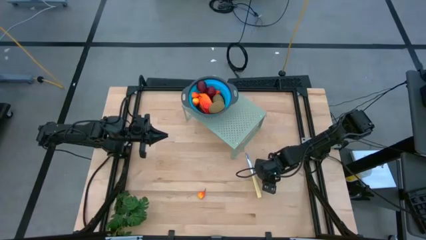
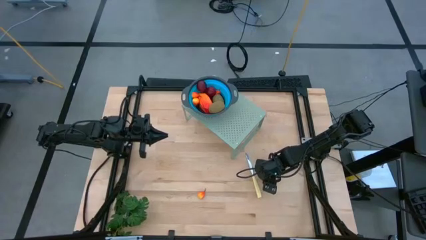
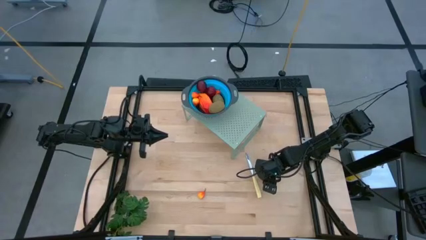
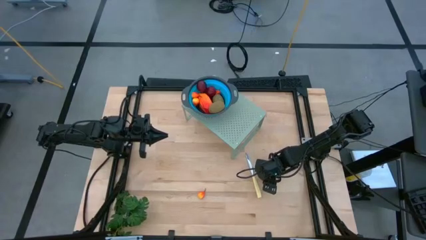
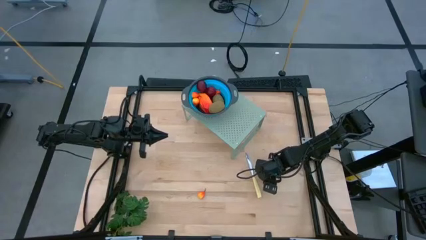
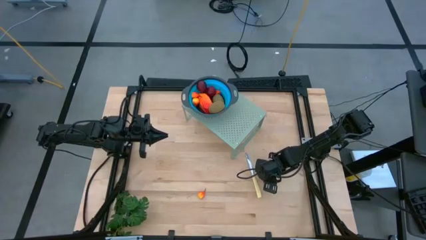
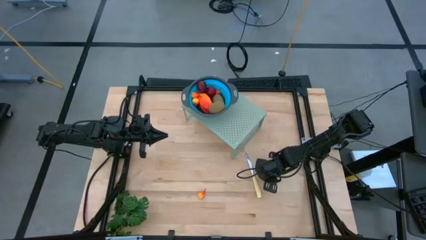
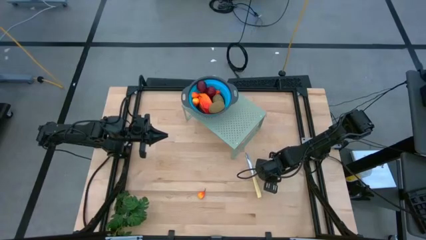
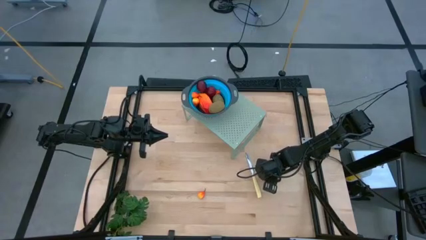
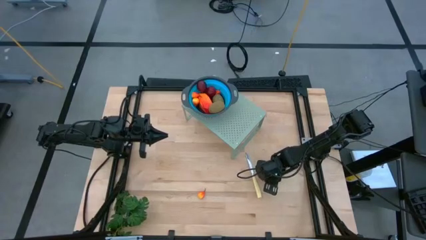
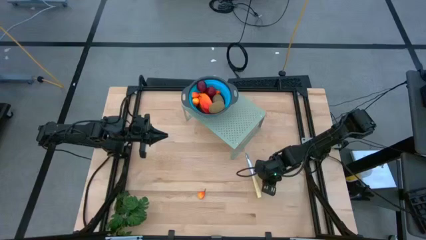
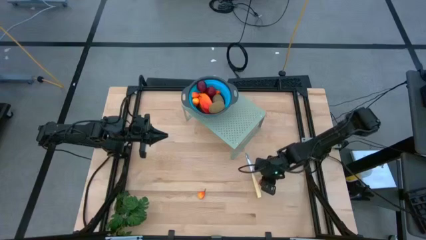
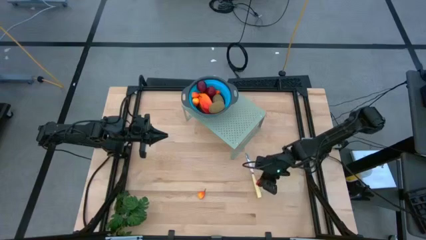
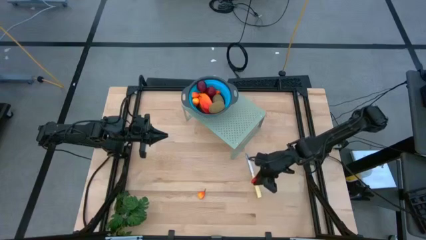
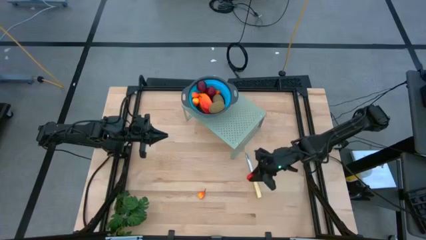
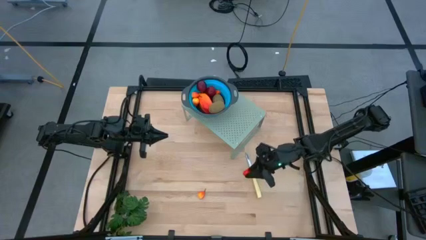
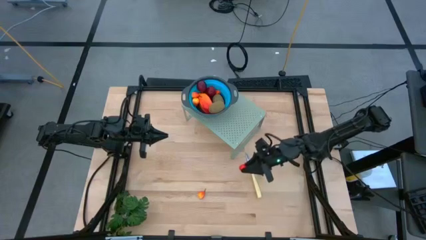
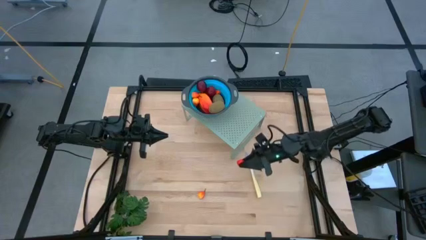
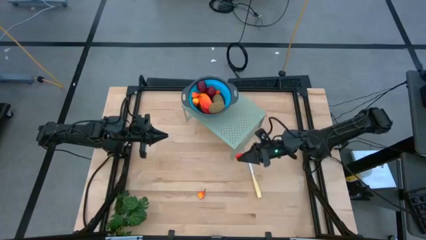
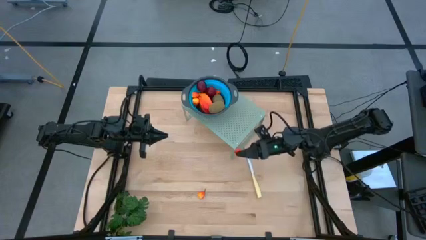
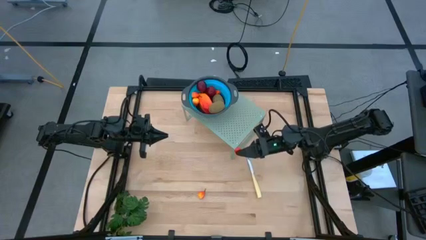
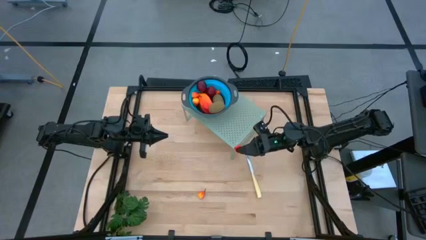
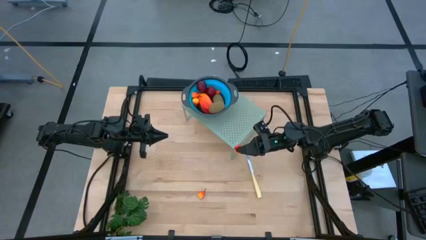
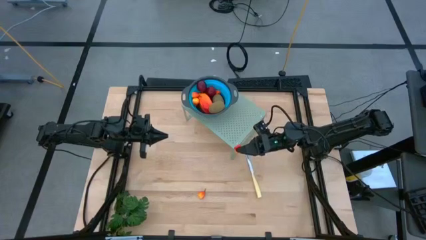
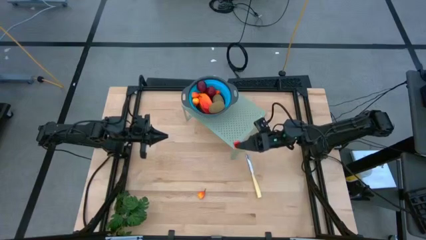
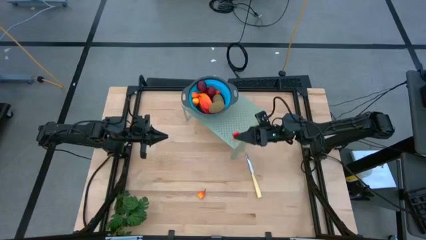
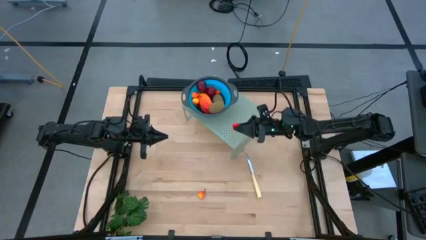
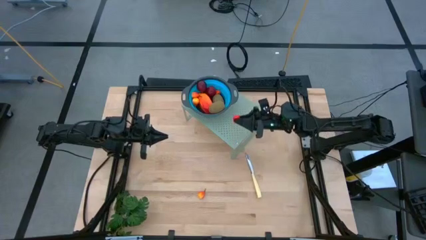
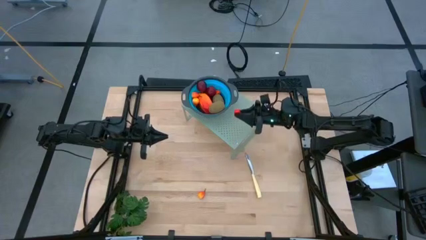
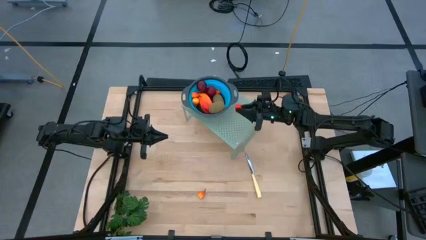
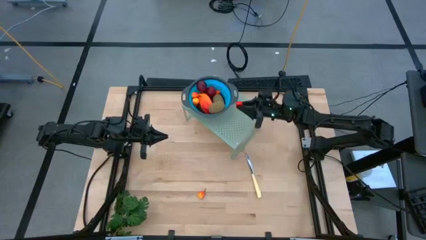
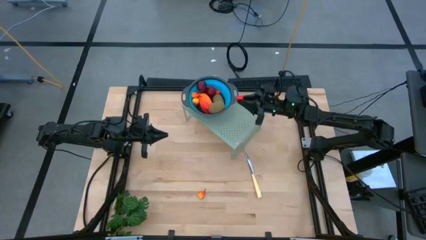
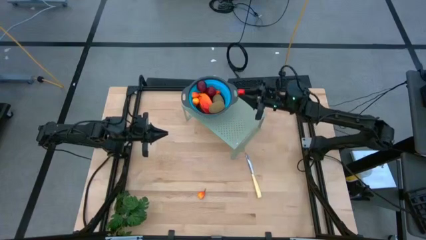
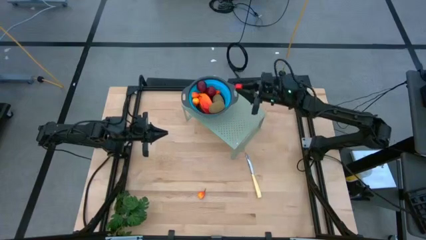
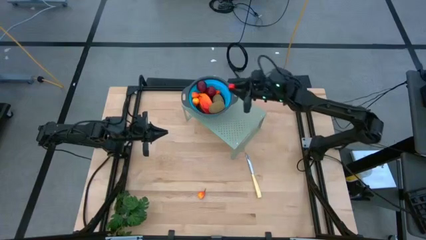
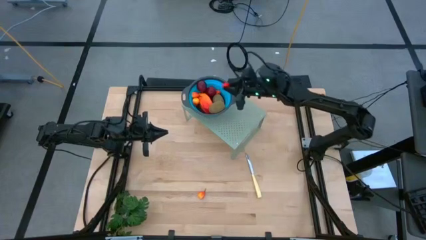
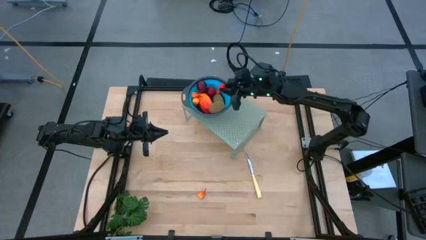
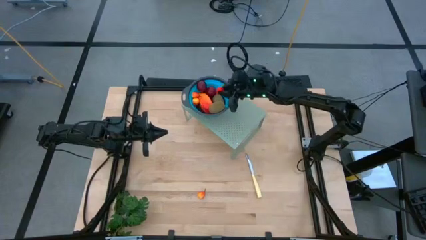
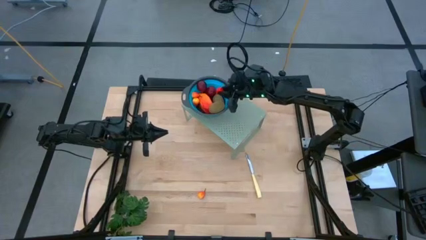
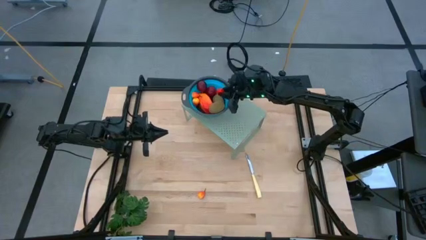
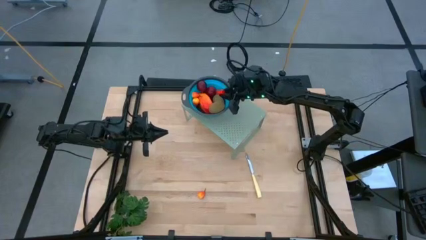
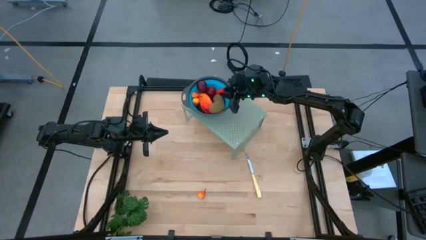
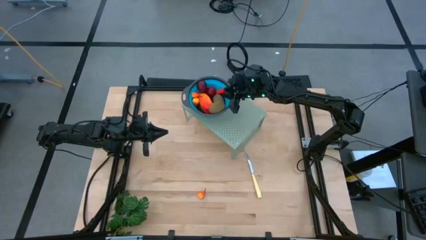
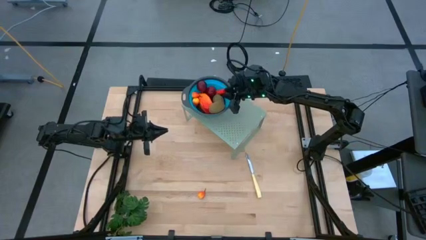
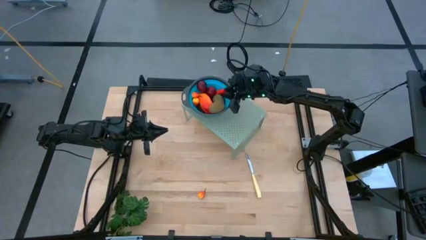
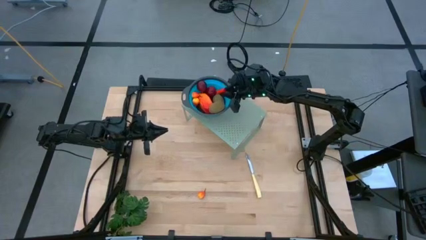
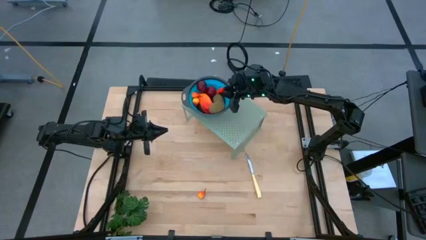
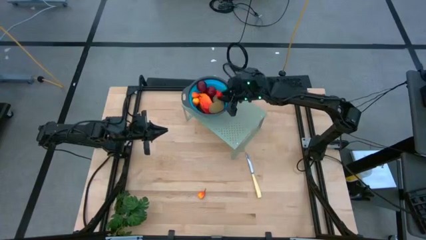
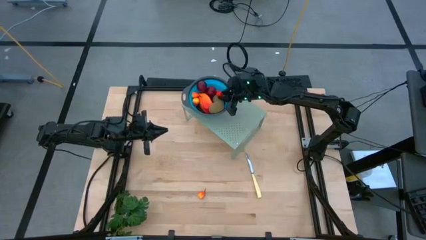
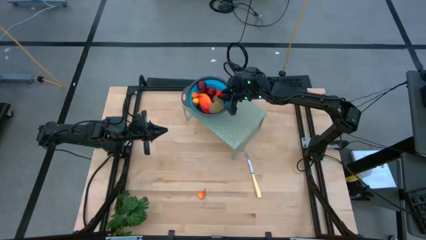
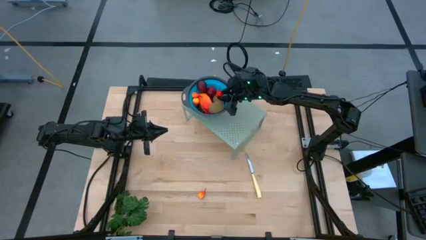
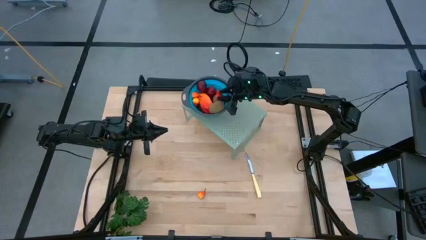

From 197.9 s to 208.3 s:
Task: Pick & Place Fruit
Put the pear into the blue strainer bowl on the shelf

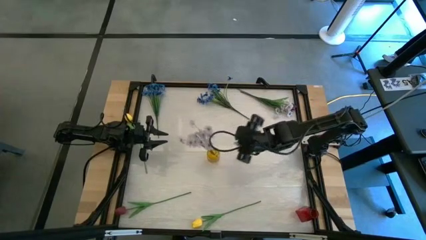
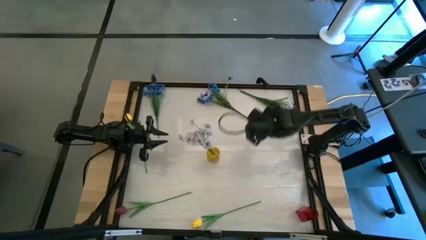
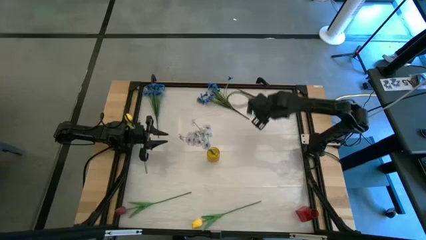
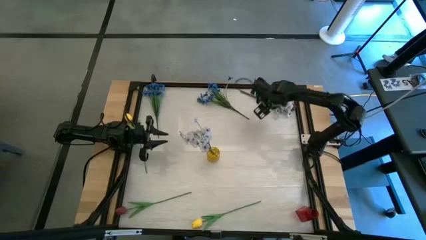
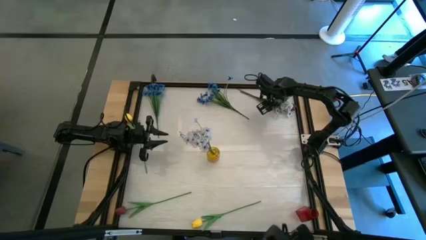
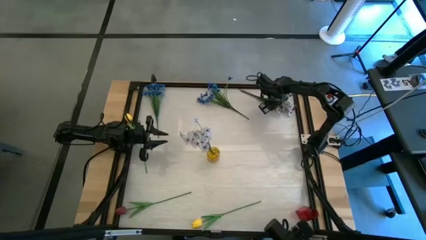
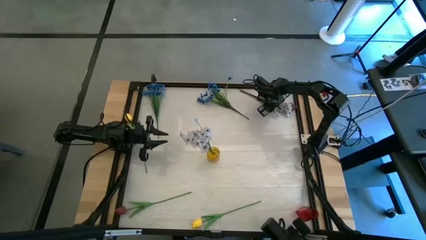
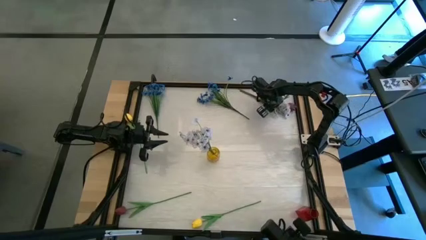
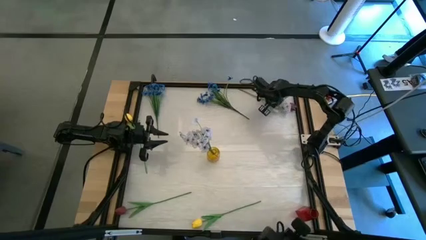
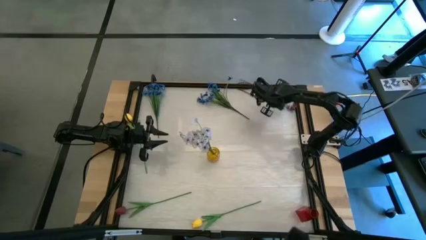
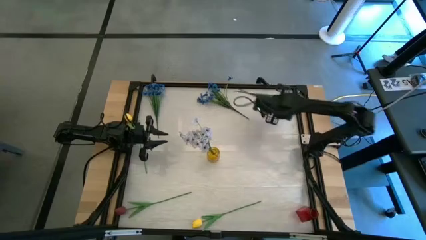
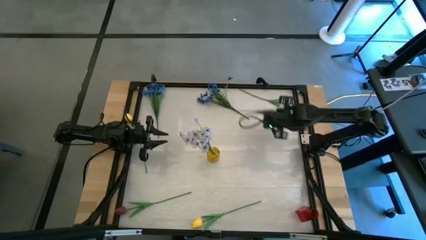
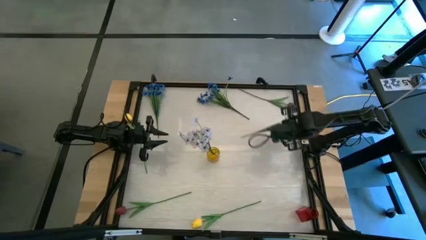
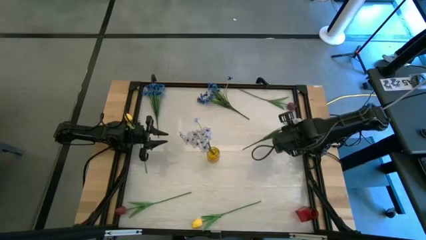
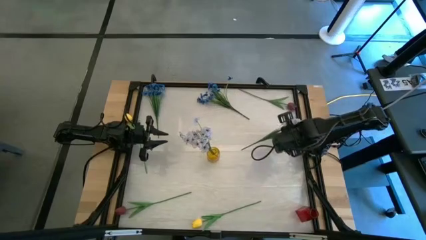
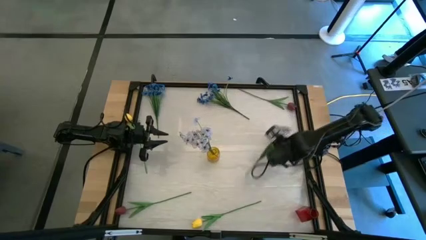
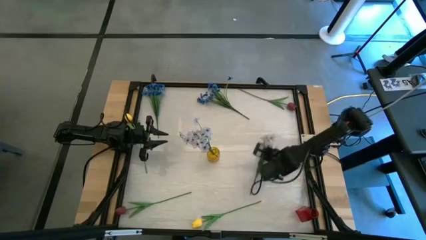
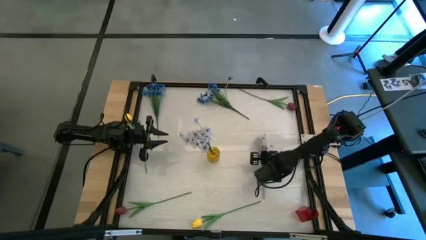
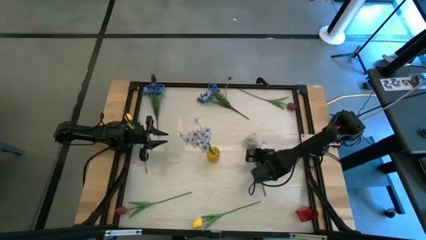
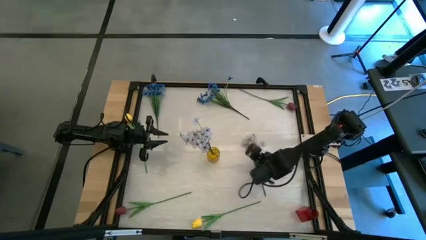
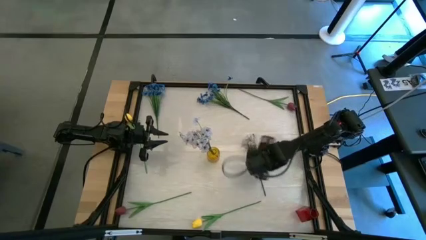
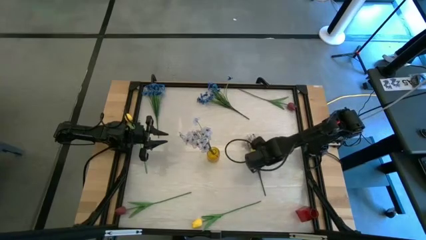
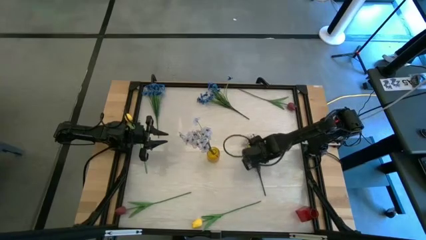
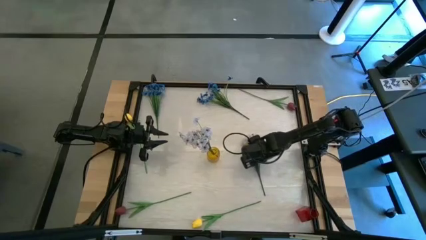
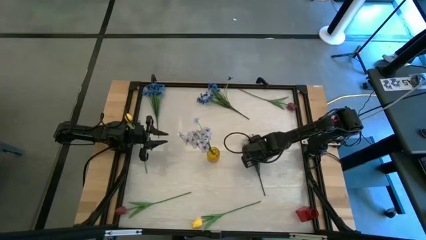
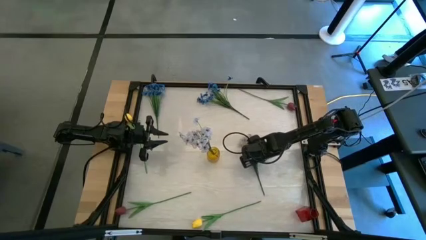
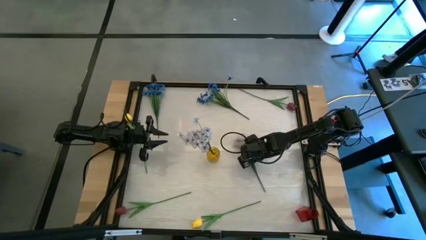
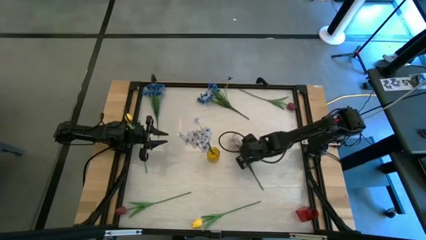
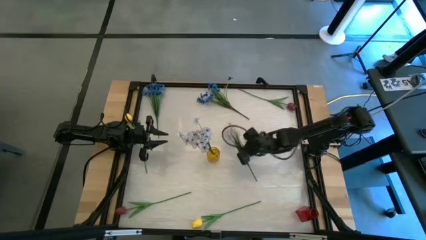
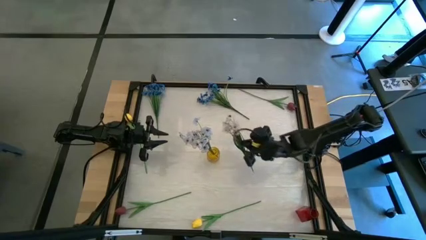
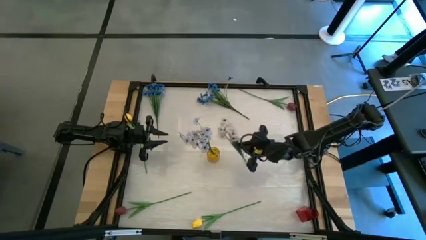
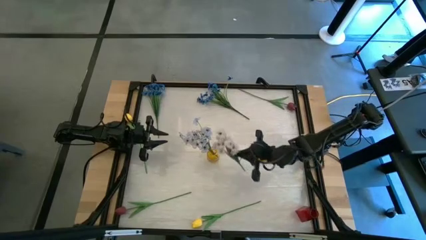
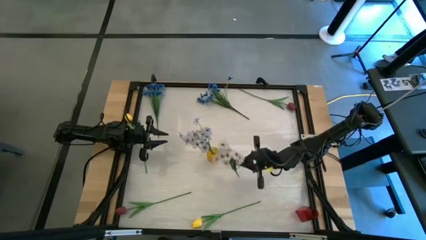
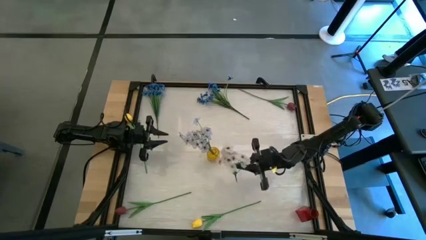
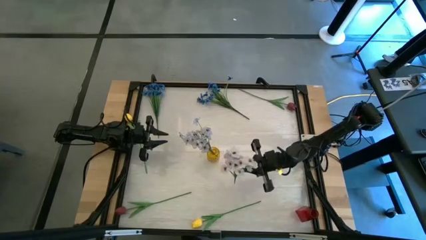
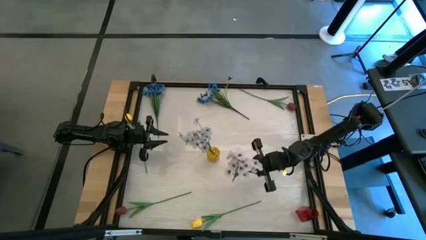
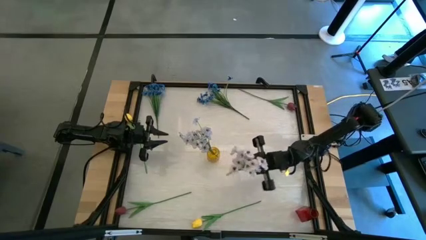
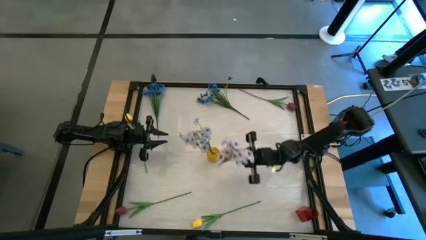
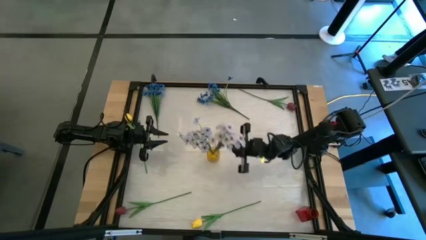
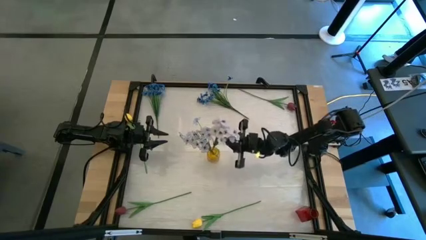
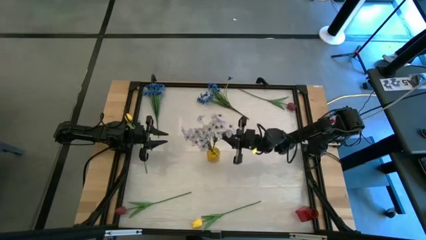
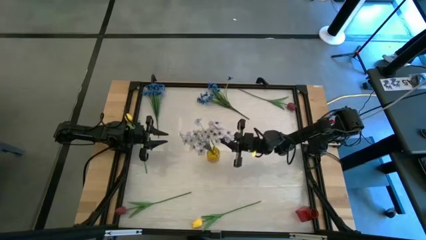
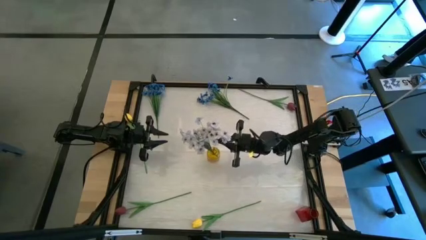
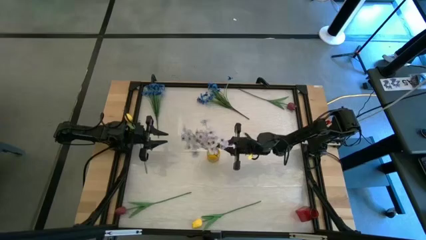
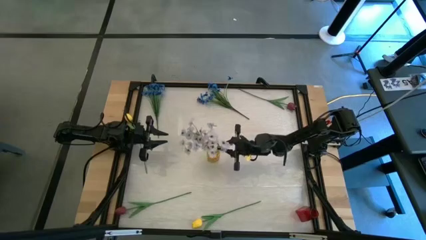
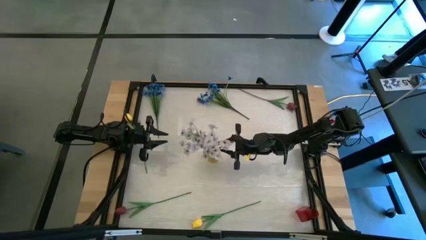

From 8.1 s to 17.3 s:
Task: Sort flowers into vase by color
Put the white flower into the yellow vase
